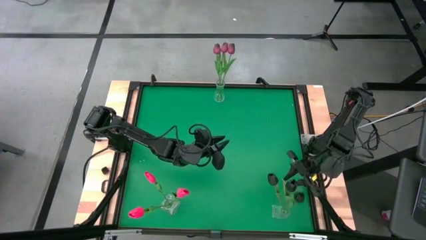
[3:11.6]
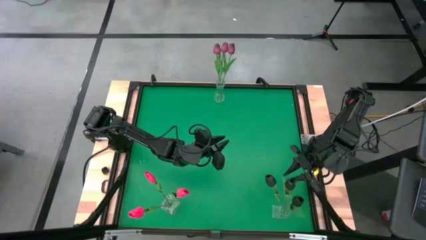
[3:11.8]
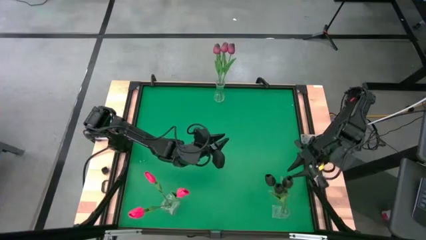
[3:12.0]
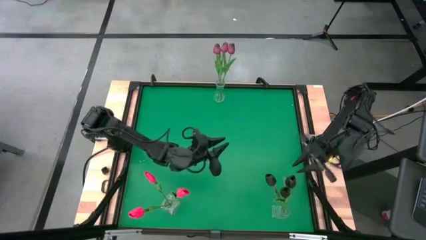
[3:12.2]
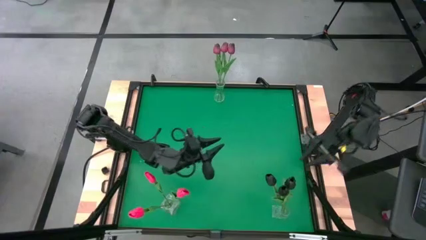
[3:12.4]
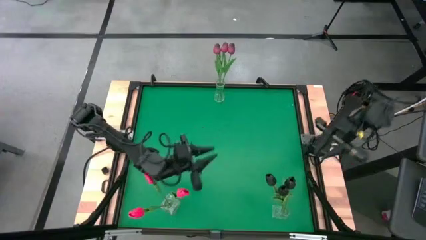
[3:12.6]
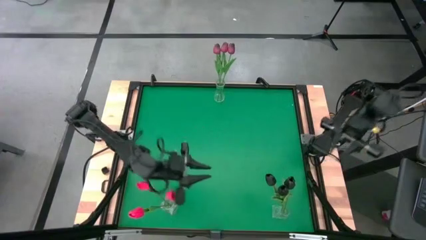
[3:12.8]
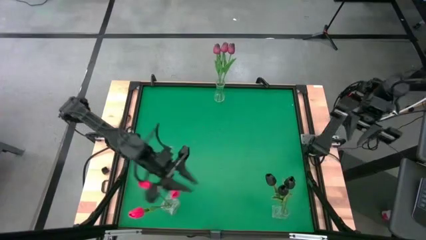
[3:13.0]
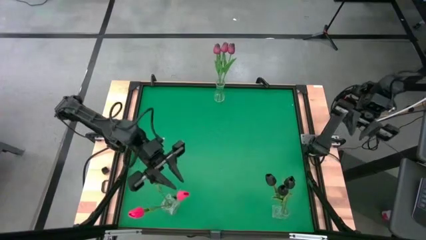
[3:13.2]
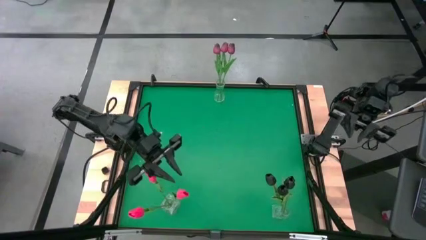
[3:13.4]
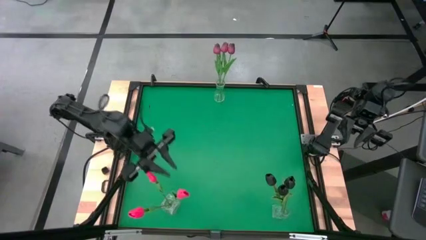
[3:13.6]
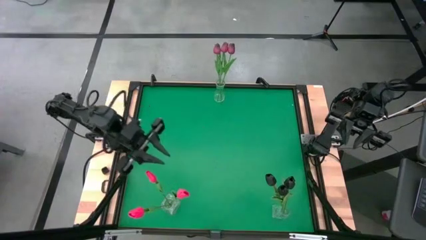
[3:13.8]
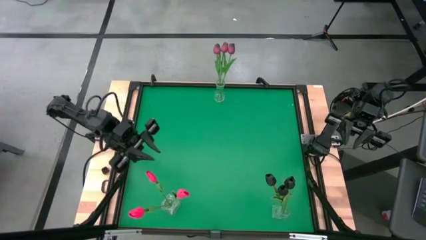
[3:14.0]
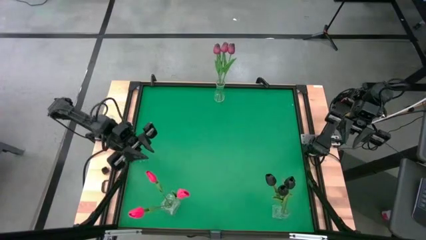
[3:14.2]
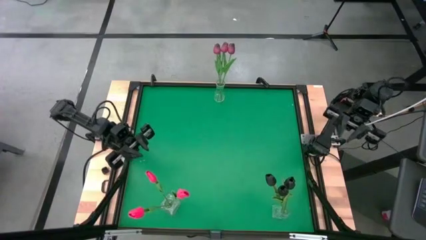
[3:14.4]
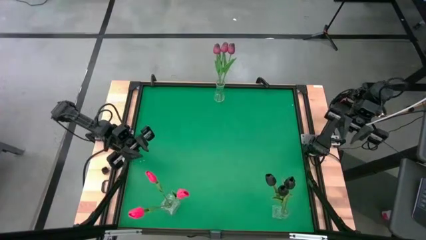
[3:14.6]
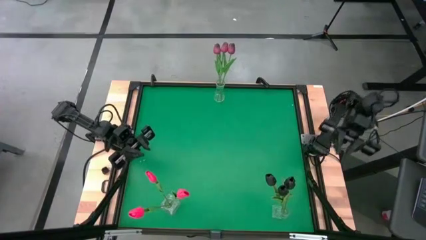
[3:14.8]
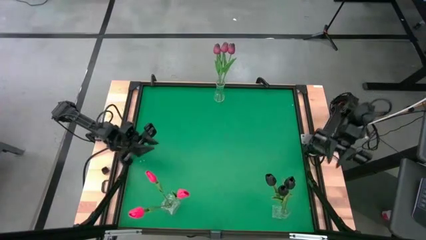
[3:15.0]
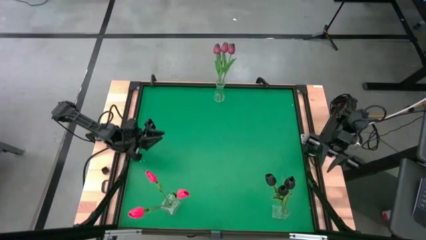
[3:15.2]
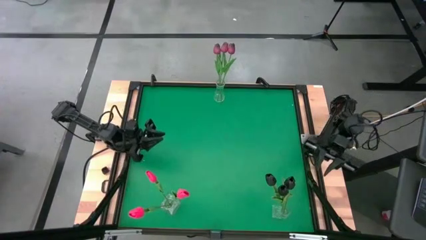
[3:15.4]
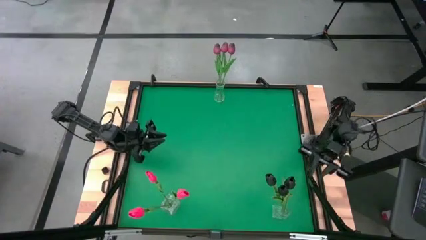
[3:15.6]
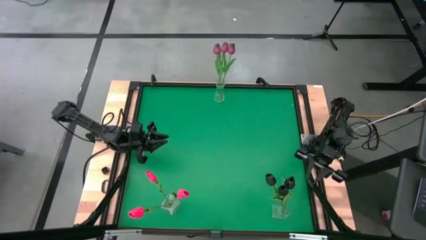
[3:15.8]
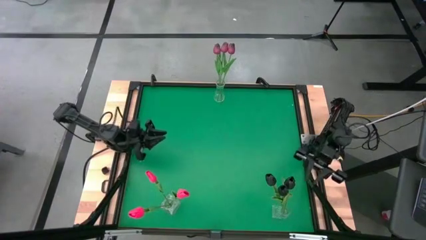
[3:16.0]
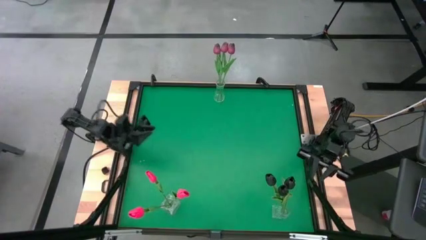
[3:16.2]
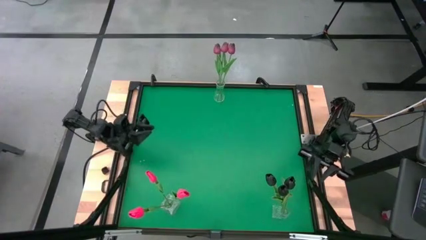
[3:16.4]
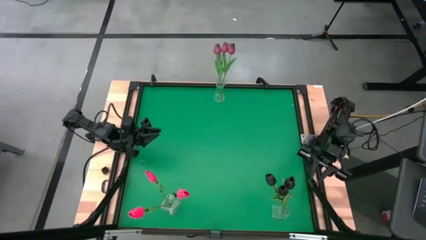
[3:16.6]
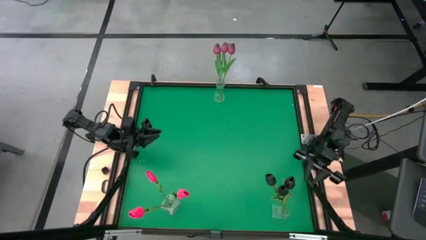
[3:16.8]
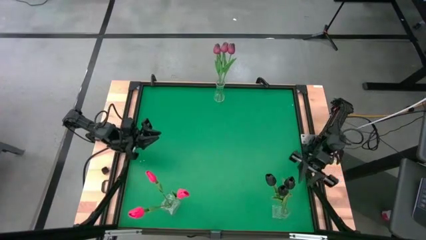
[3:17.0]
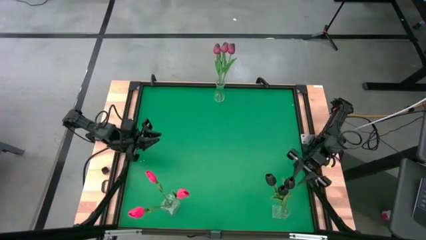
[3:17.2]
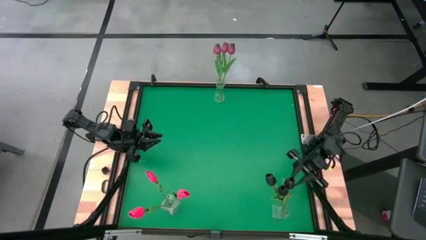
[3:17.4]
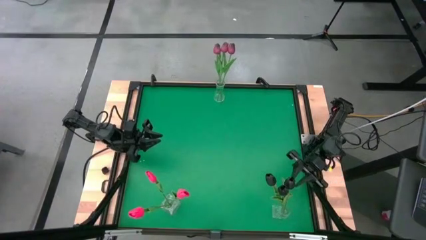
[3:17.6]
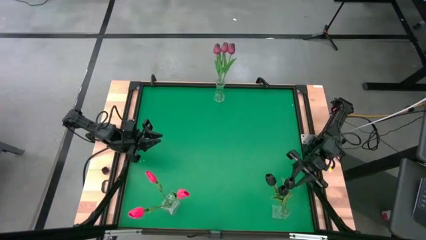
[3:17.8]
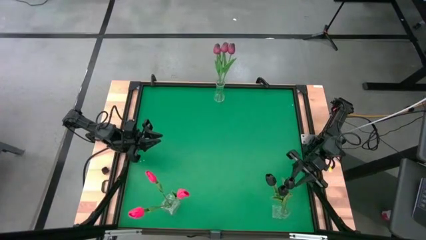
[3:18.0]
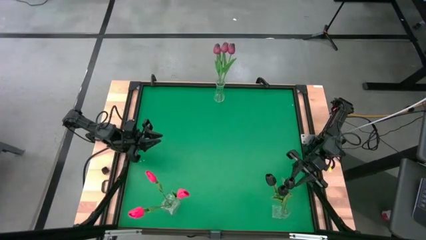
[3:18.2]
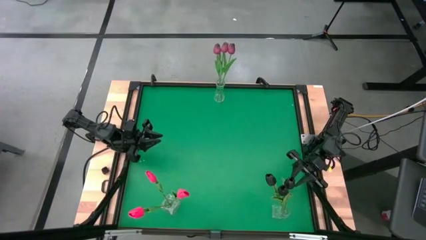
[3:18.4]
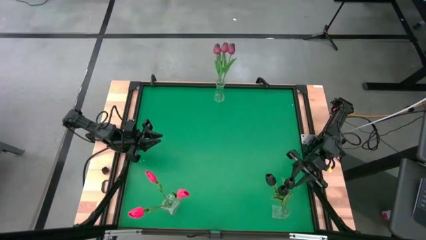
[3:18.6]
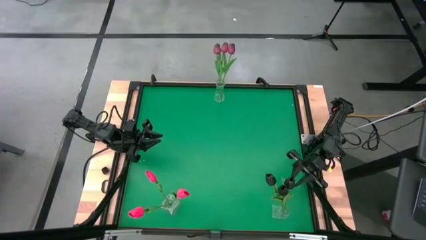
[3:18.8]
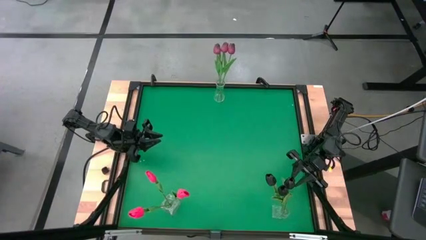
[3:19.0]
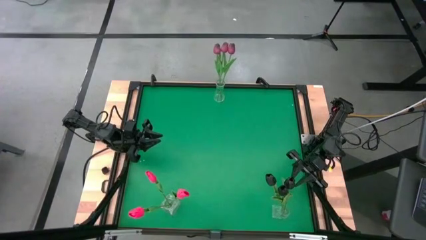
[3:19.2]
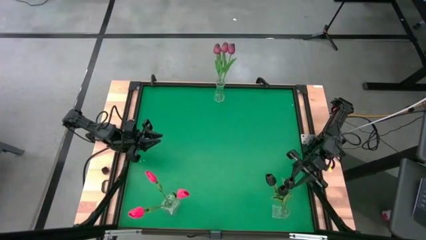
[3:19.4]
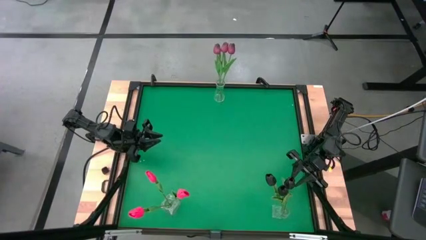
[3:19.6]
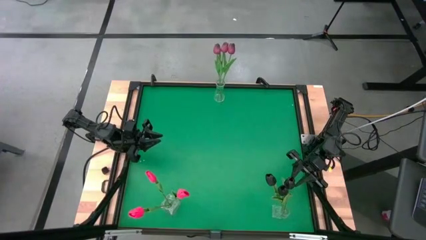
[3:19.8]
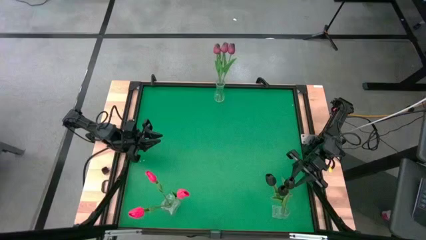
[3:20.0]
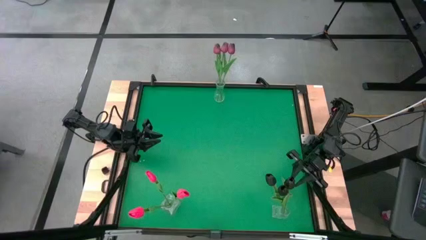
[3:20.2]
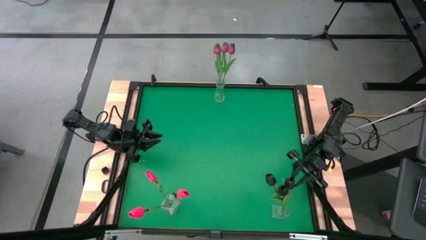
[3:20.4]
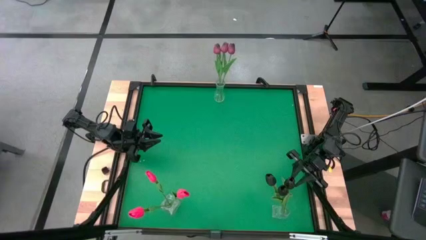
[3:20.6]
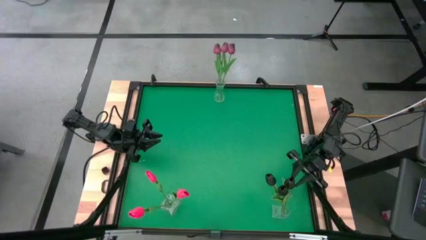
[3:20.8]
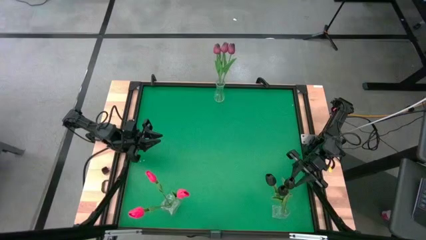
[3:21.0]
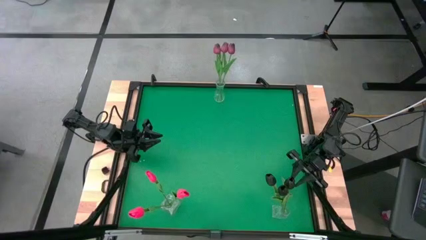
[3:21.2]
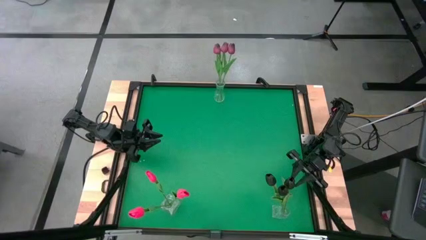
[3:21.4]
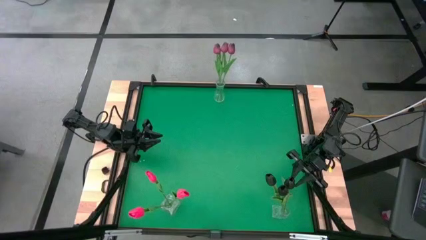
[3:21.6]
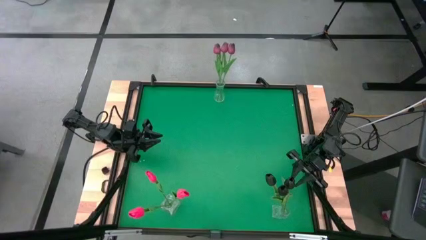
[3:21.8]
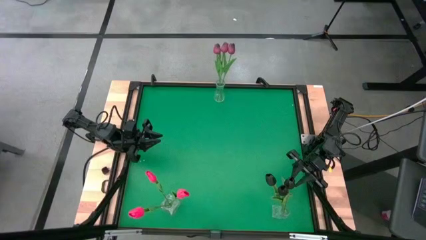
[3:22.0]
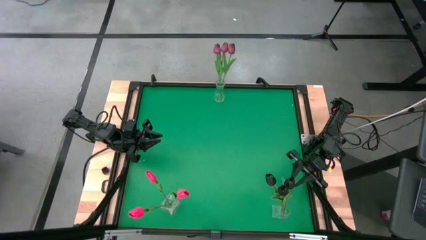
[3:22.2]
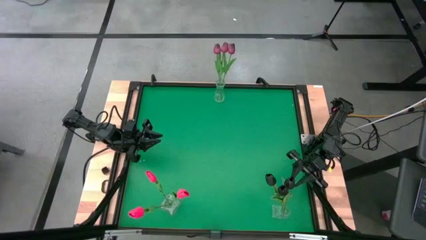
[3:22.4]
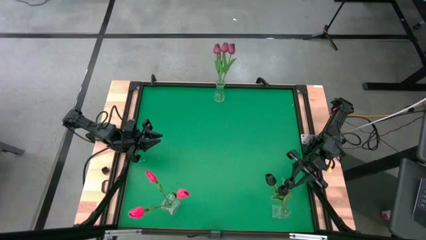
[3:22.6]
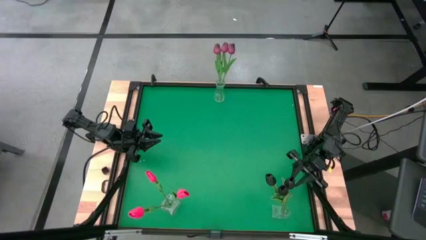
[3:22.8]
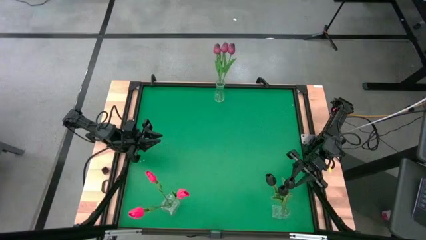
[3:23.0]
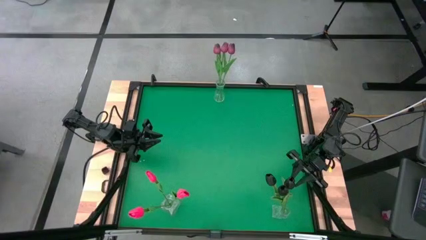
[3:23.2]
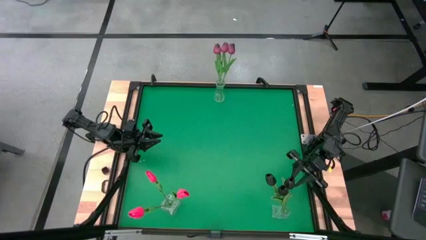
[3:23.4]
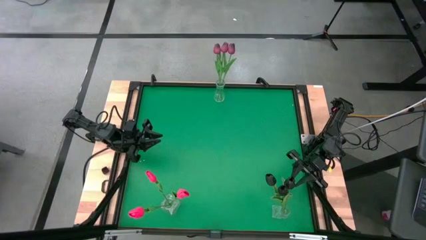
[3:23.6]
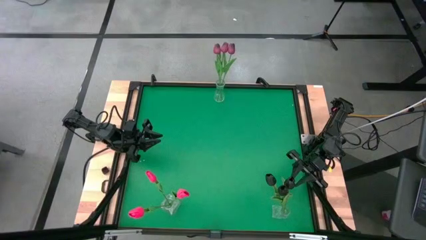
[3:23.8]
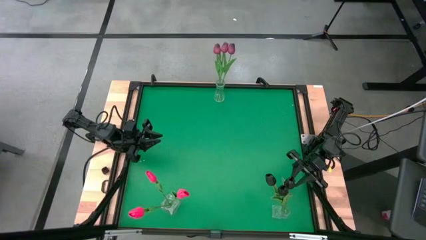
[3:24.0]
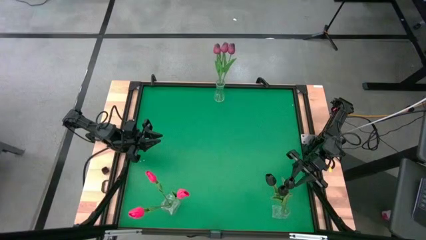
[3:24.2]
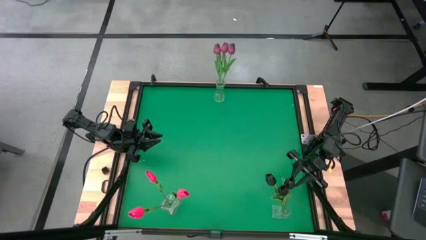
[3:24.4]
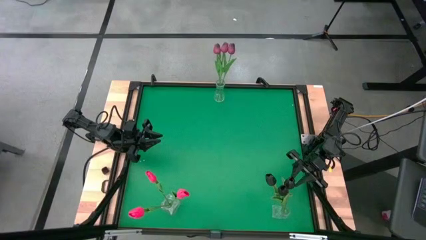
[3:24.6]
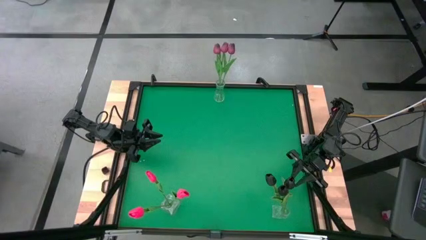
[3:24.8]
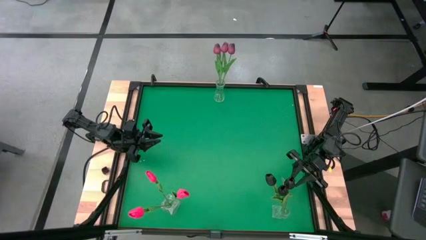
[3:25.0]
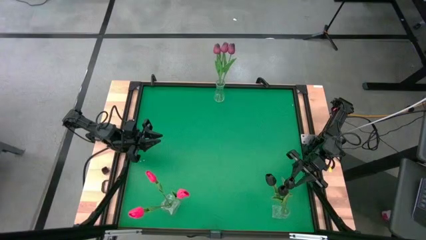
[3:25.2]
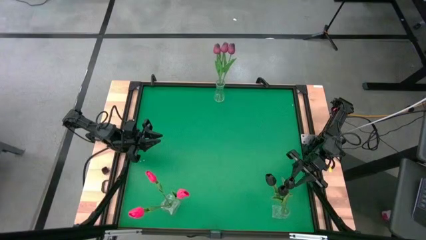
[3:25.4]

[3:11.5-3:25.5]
Task: Sort flowers into vase by color
Return to Home Position
